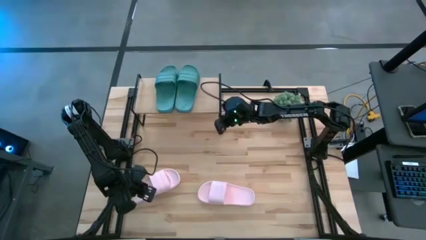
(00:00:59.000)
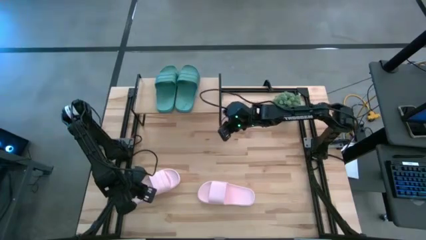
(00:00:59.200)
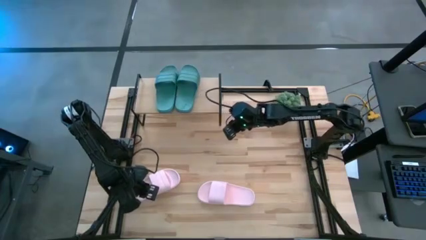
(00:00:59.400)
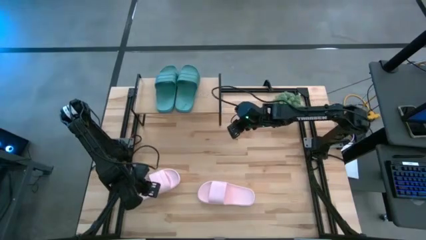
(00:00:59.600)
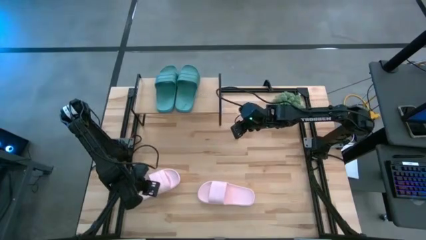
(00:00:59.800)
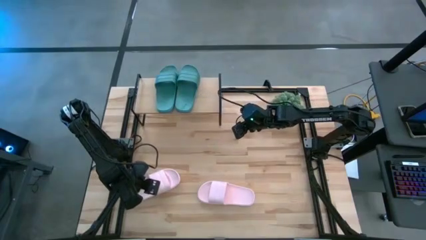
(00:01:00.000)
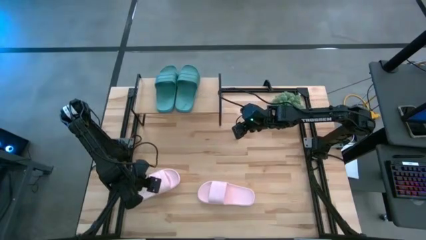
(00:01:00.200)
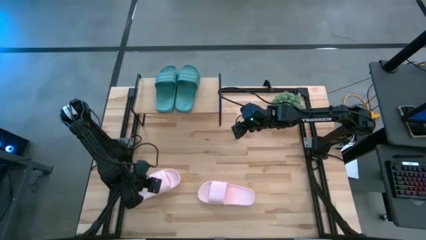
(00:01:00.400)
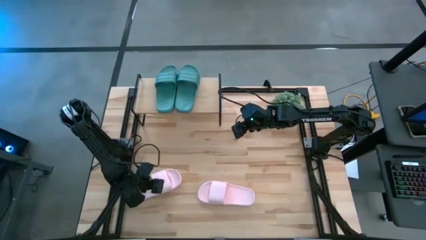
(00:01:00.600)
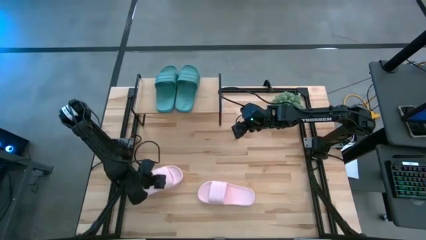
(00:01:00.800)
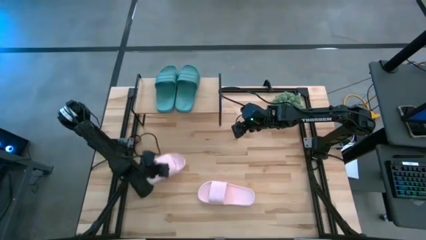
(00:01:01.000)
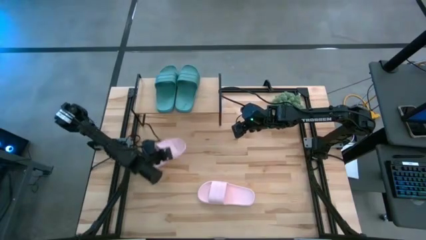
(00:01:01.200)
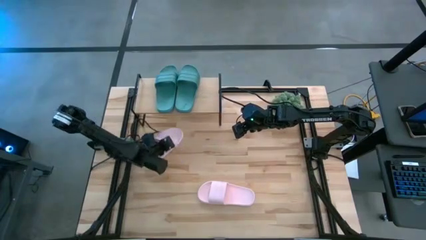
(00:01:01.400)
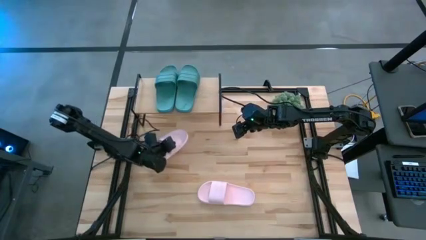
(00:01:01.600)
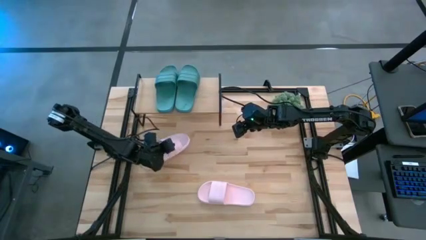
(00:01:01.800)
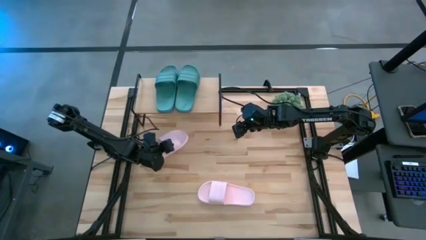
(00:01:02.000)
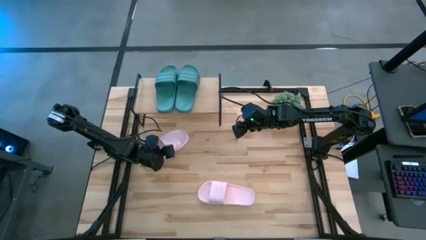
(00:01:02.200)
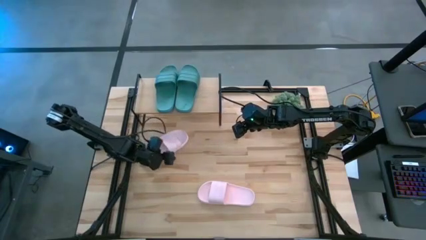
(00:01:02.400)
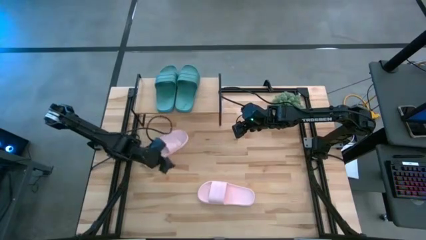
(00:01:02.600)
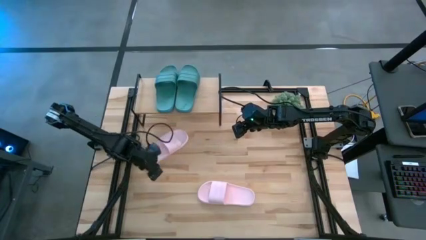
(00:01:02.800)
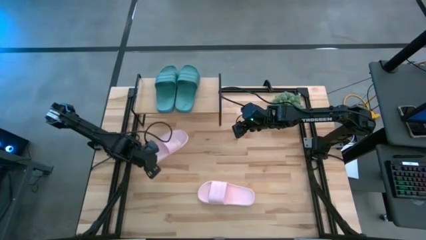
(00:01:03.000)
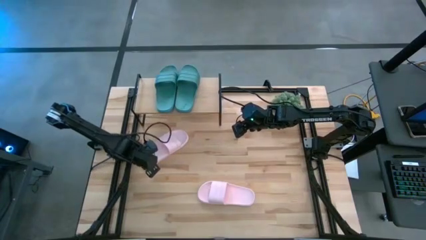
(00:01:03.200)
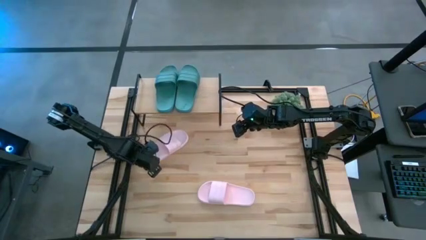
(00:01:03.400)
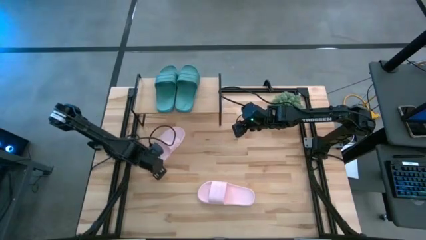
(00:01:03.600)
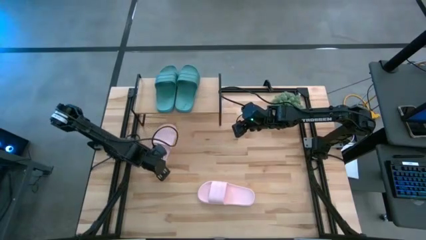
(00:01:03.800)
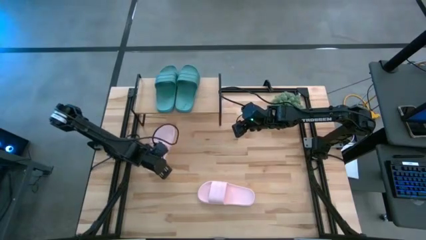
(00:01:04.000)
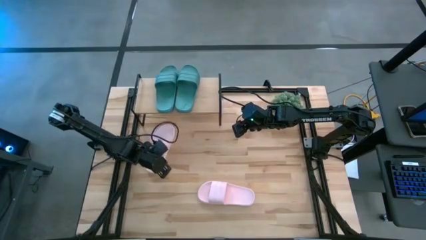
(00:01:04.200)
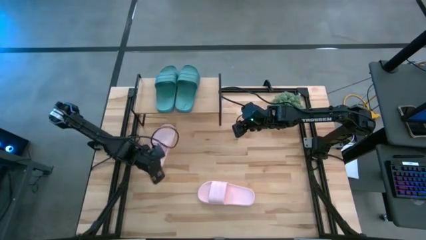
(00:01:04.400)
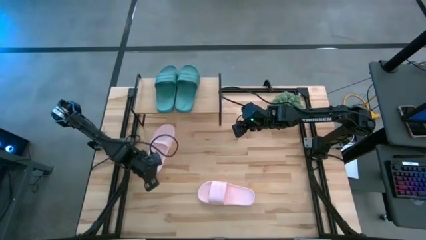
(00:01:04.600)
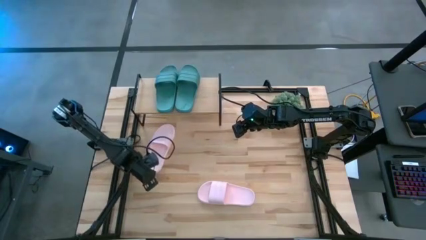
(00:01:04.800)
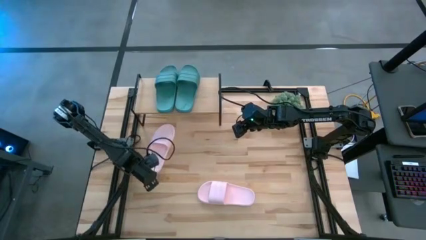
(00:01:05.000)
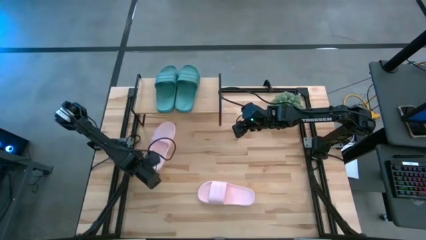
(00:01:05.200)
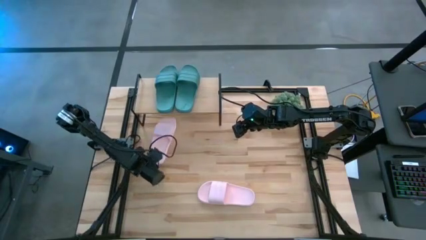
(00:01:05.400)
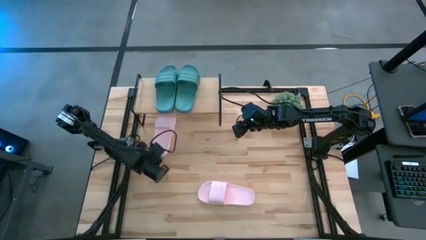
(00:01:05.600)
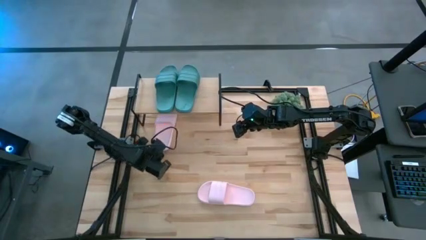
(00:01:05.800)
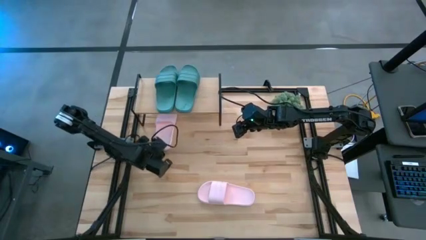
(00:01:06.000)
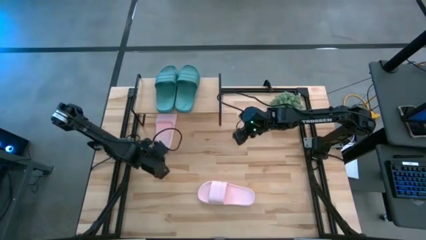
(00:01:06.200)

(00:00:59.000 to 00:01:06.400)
Task: Pick and place slides into the shelf
Put the left pink slide under the shelf

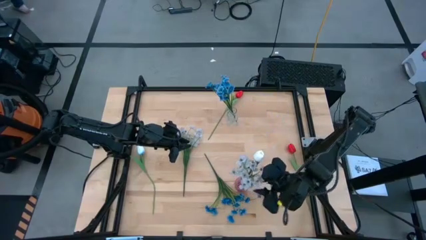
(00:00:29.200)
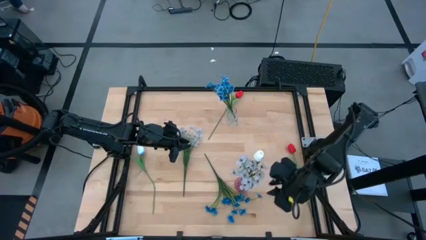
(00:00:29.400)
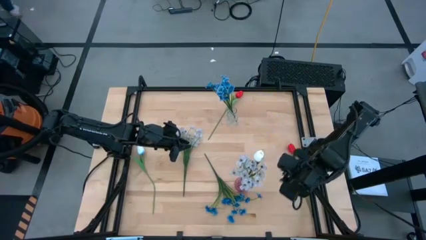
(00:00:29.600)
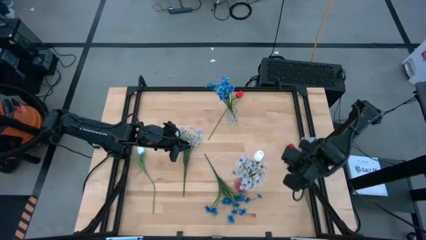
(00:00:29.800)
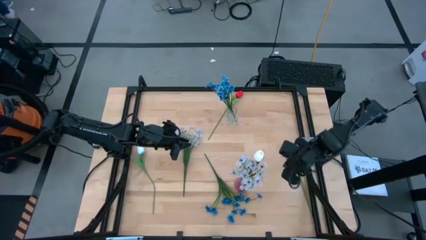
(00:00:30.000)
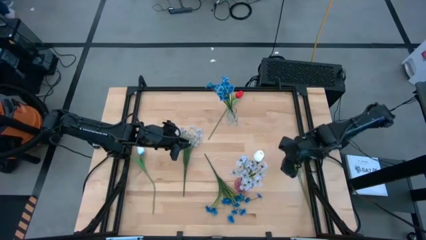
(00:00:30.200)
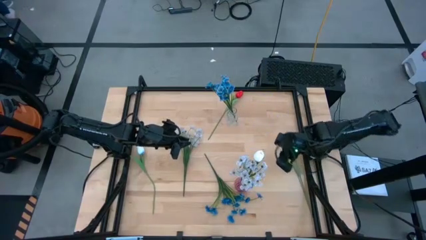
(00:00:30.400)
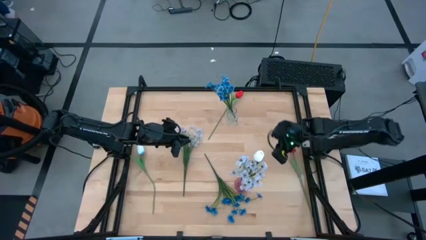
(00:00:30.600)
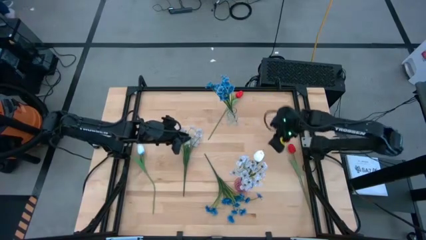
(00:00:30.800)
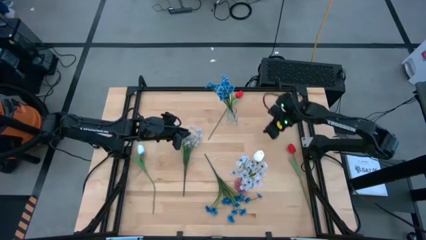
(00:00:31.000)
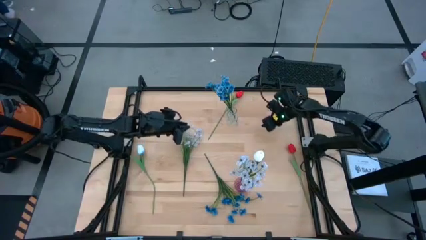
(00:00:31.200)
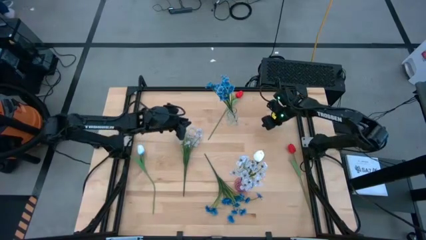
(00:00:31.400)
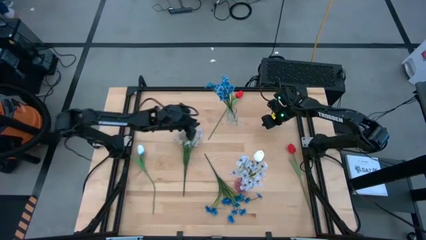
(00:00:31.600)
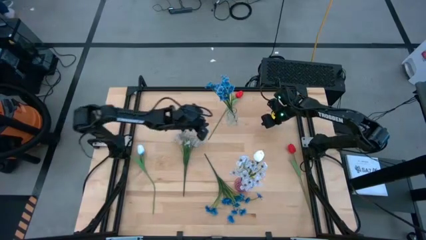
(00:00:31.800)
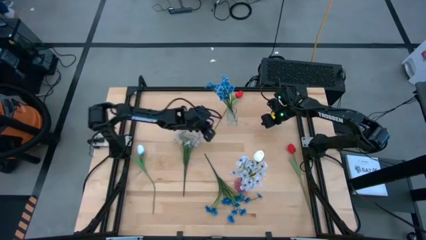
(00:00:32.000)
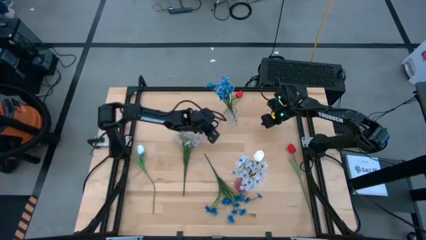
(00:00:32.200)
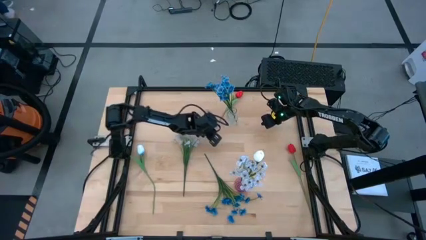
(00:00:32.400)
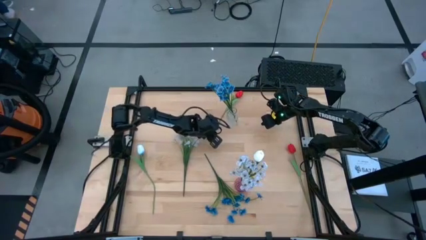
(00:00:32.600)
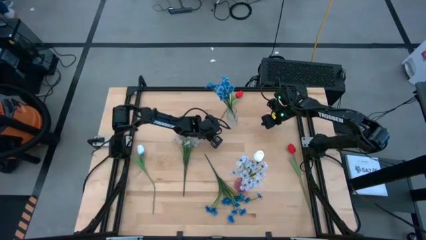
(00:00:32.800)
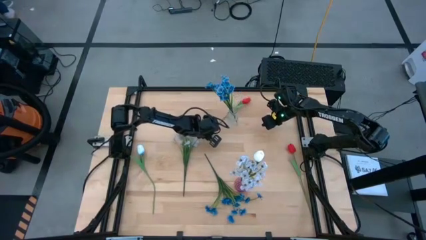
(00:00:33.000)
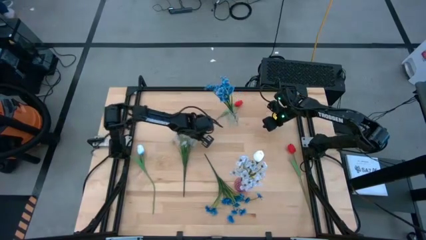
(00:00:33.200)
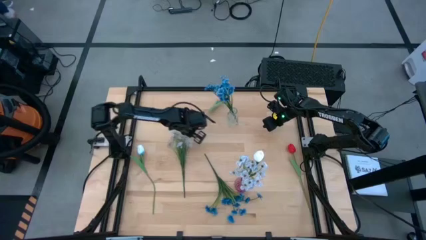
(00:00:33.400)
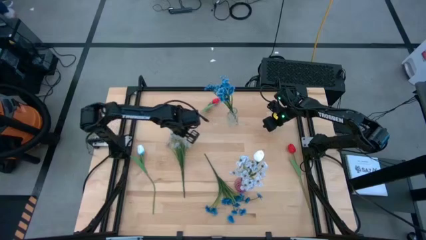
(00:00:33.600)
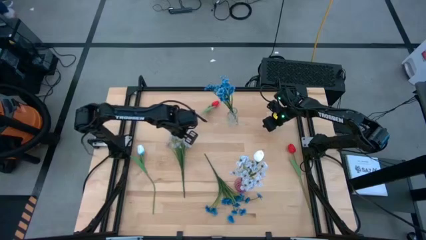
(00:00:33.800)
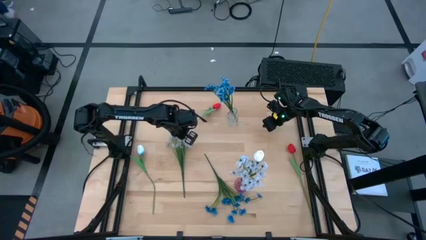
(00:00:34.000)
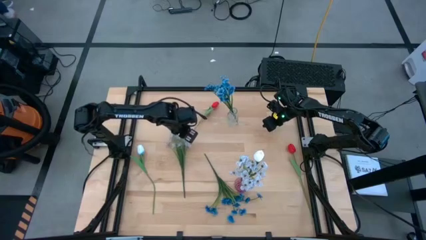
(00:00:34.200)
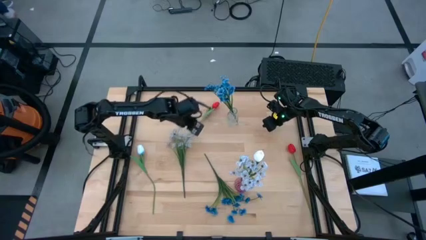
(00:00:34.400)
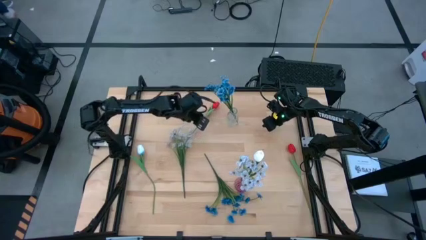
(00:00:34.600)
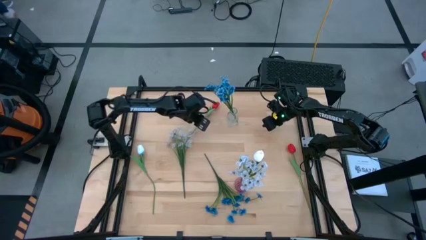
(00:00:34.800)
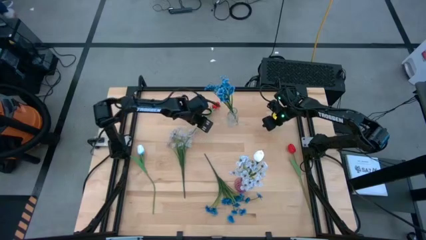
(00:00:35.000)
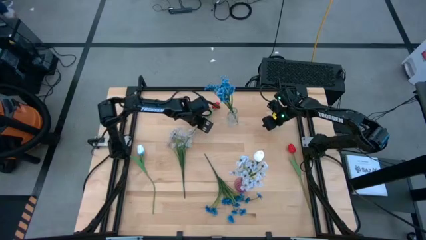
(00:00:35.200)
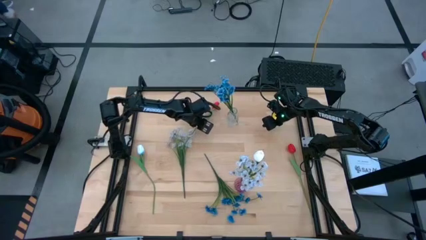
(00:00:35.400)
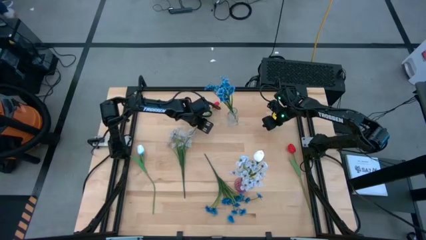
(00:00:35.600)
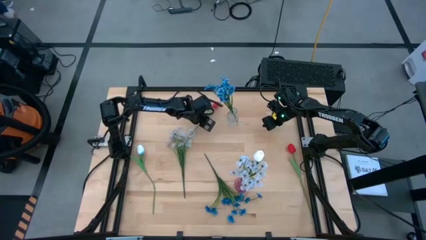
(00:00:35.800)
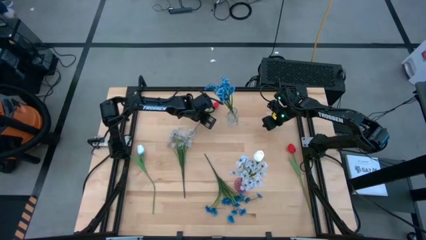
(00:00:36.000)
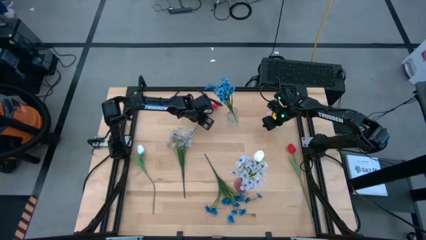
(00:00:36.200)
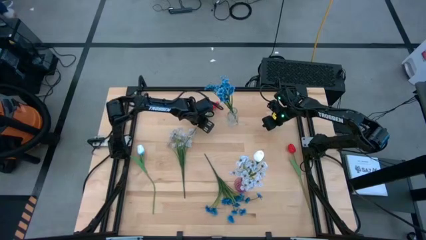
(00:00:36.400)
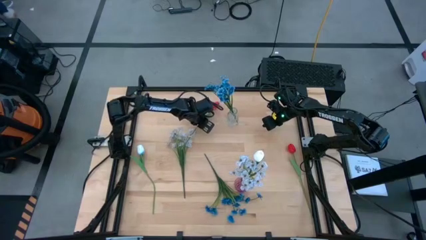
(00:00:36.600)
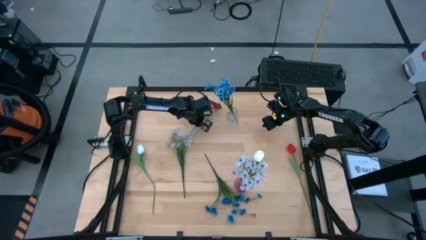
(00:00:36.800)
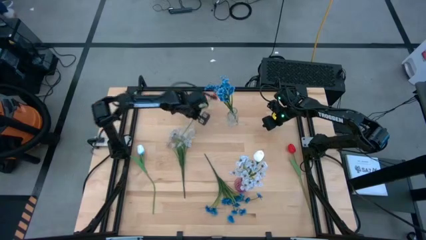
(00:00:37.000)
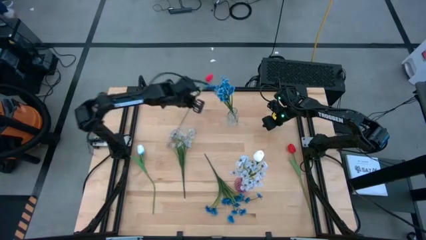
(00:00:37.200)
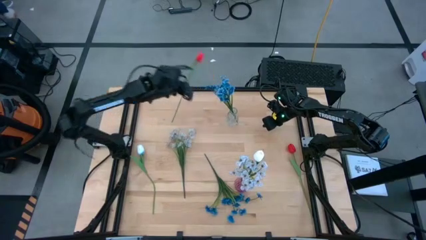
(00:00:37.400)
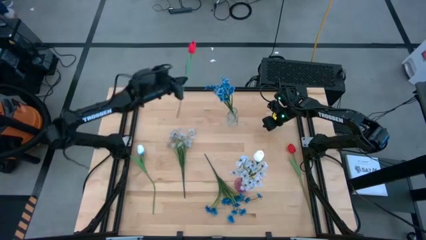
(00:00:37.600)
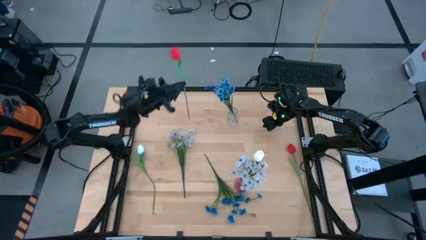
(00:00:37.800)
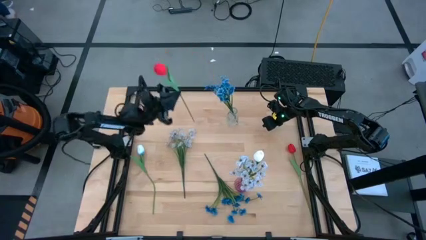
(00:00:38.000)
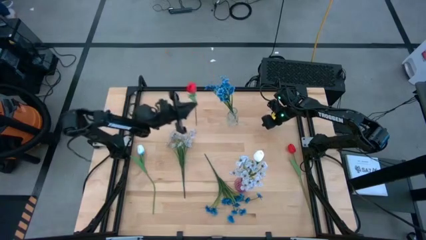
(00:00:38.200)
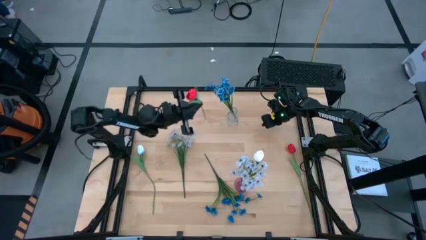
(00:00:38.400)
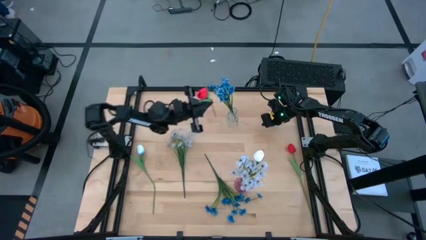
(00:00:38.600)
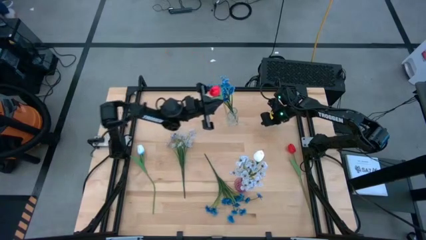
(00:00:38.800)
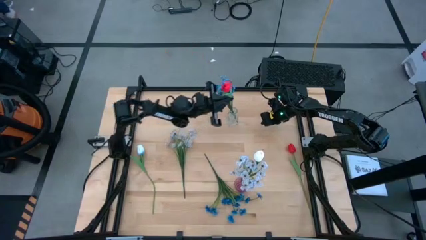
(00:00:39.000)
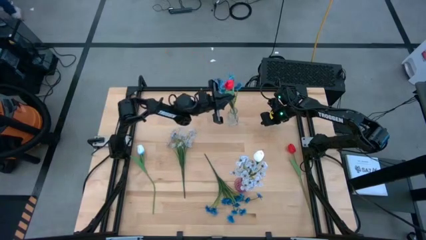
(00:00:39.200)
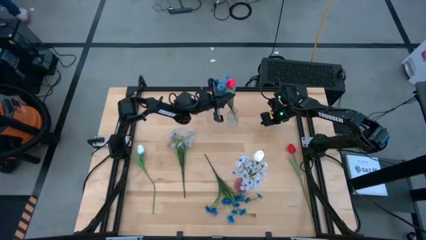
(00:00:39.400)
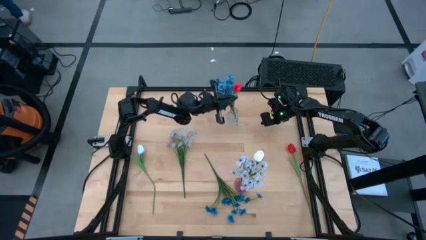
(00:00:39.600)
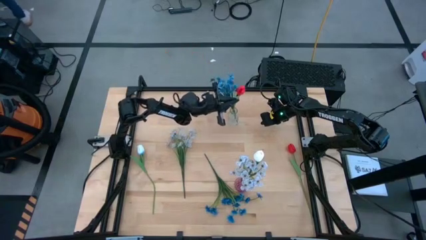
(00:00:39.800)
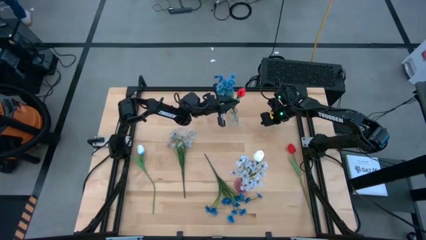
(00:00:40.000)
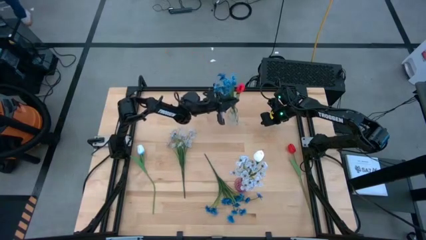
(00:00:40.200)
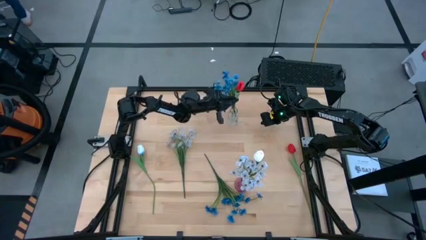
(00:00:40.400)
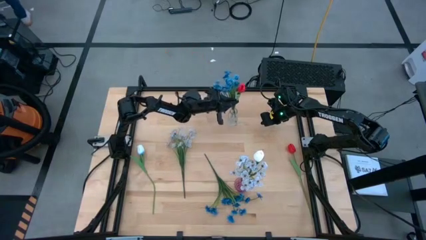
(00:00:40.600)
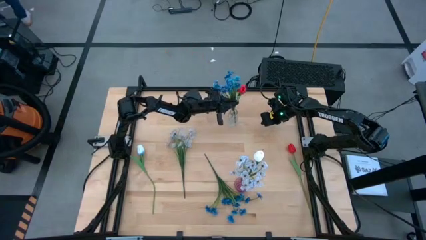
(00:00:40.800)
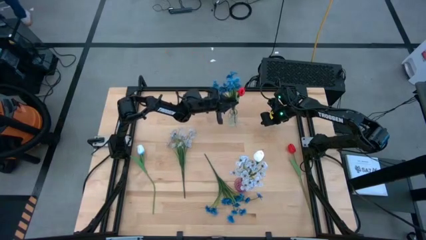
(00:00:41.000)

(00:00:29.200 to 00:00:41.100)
Task: Sort flowers into vase by color
Put the top red flower into the transparent vase
